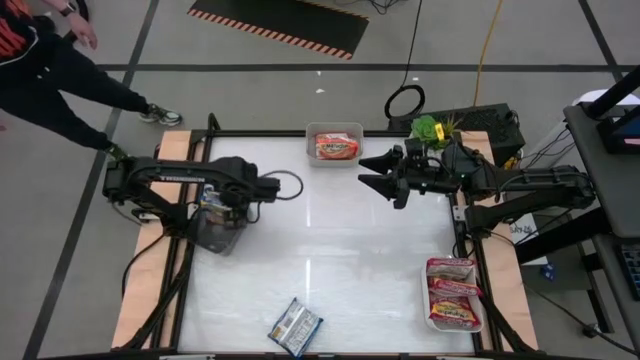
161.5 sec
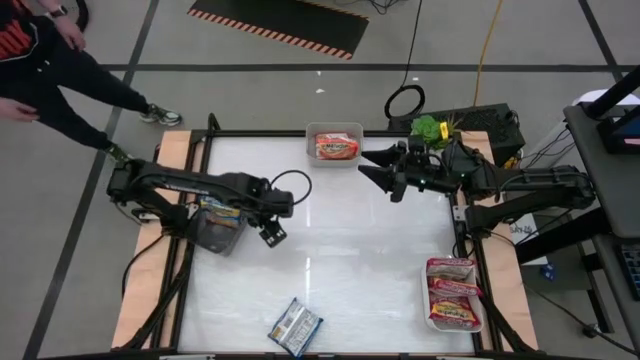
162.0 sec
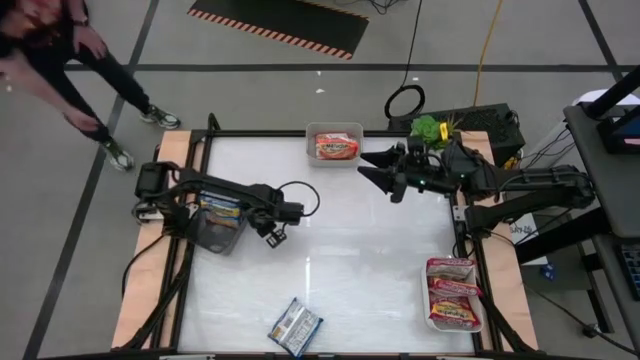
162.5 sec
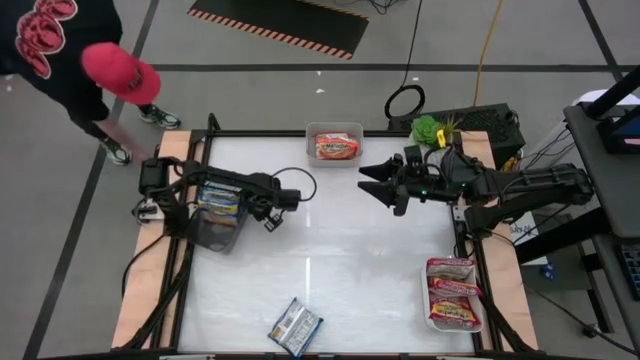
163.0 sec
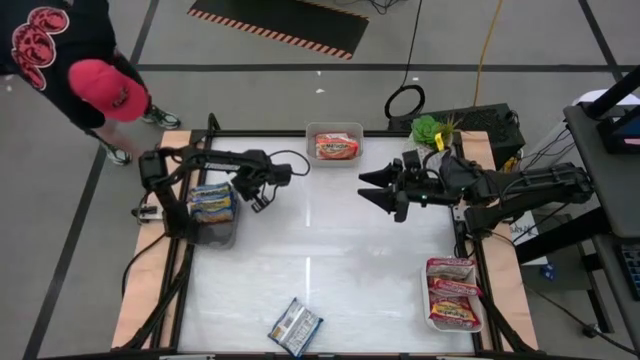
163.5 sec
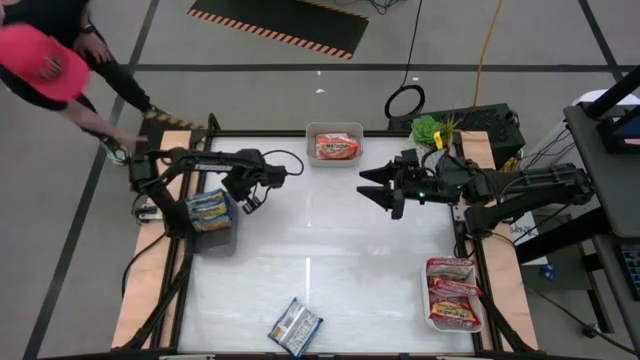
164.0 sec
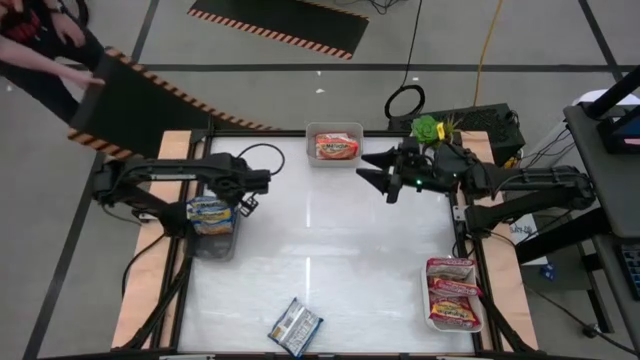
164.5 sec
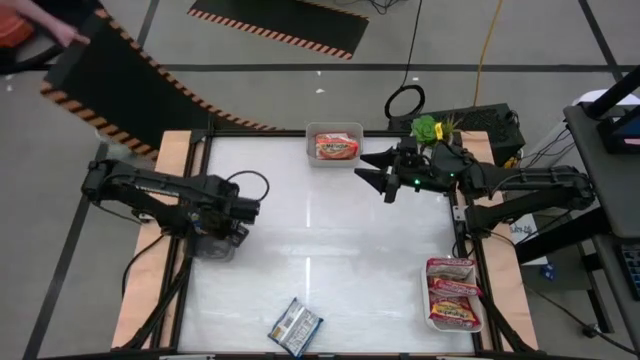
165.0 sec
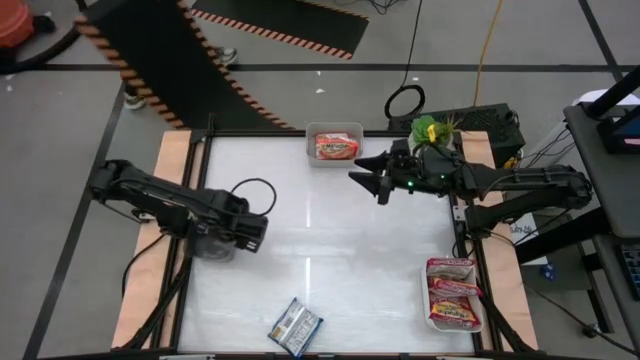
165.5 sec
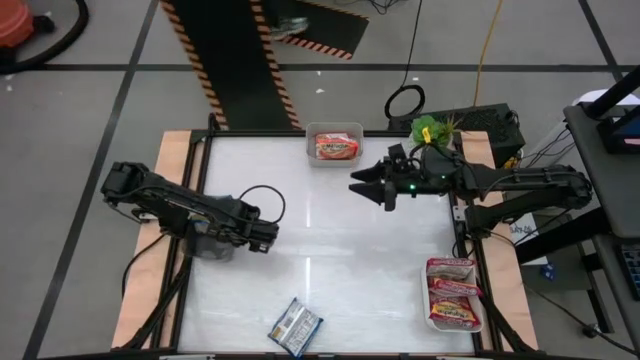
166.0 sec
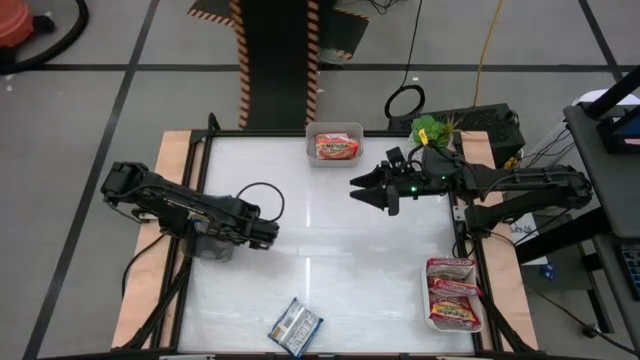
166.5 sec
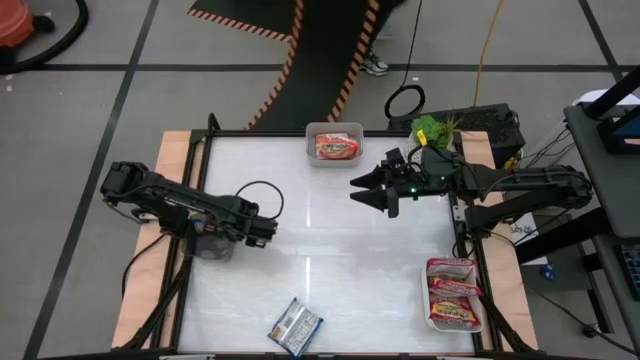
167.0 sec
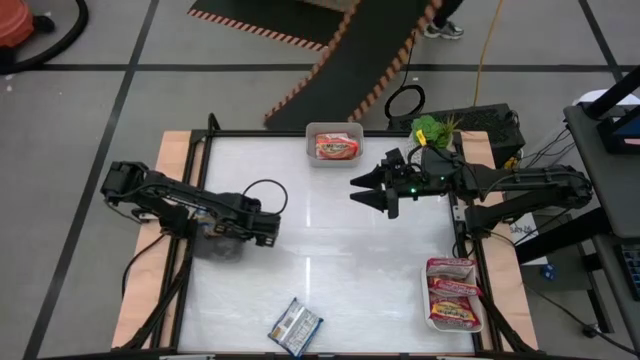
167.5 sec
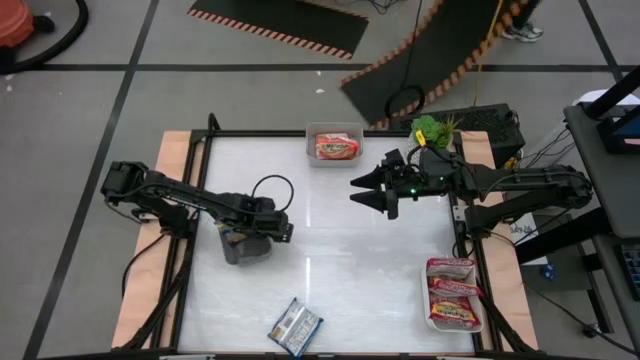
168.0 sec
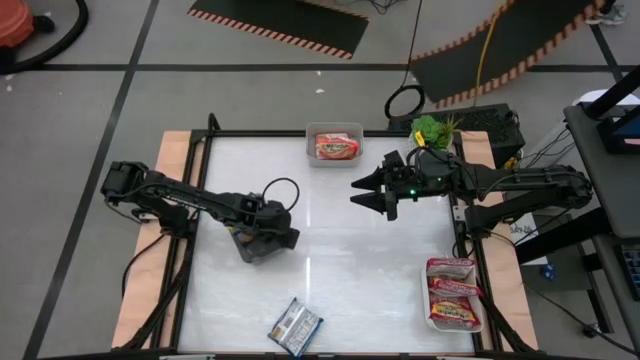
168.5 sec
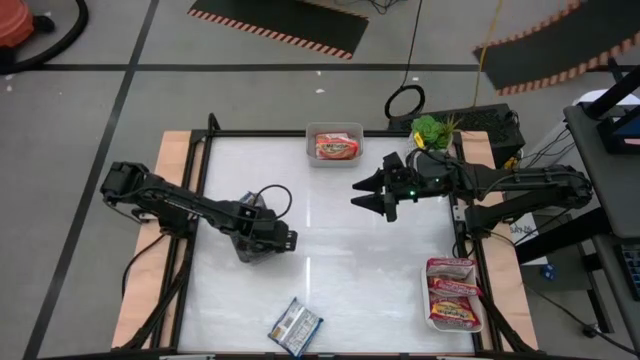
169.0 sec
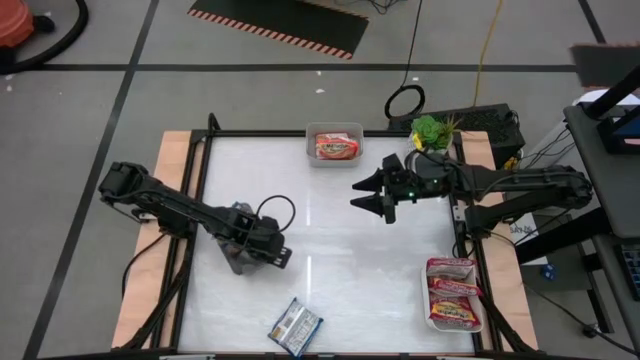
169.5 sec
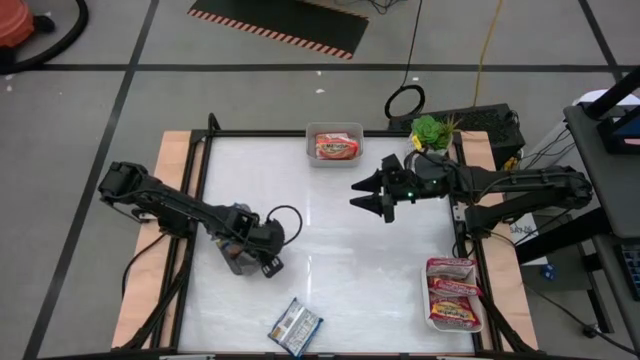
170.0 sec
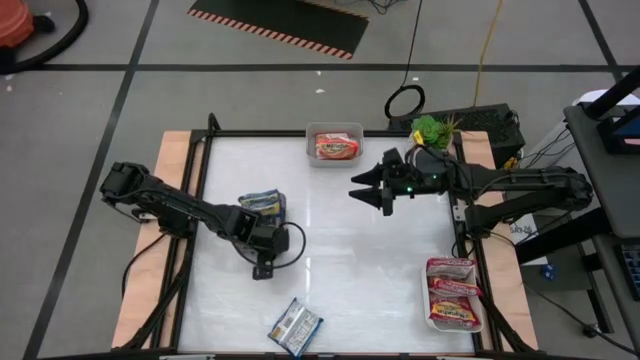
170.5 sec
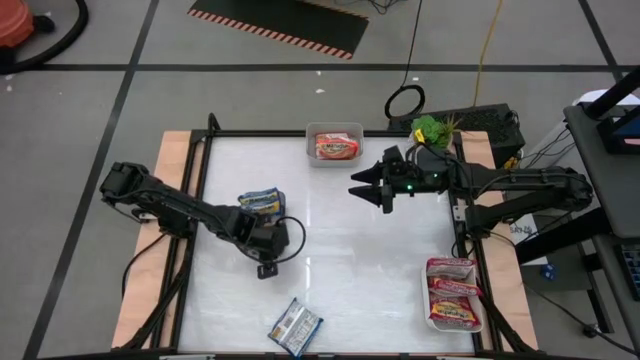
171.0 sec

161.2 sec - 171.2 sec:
Task: Sort Maruchan noodles
Adjust the black bin on the table

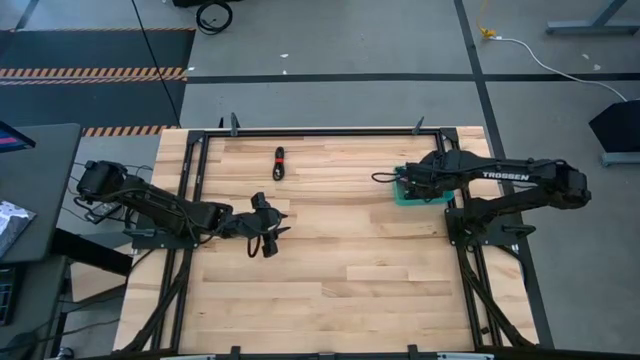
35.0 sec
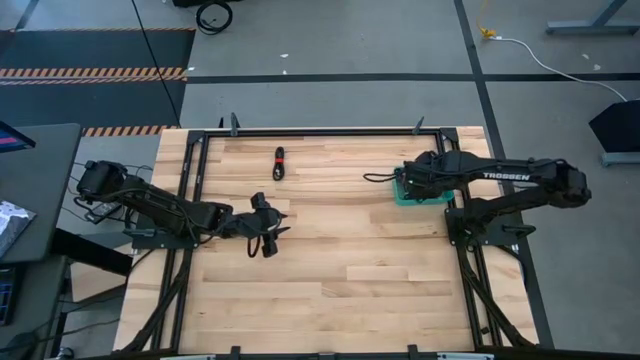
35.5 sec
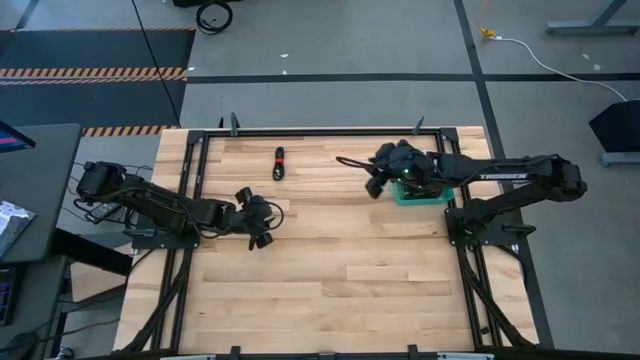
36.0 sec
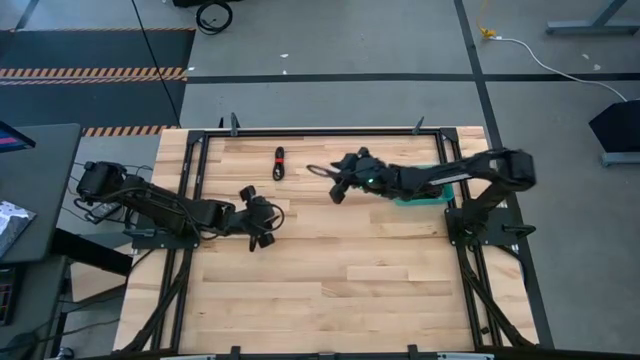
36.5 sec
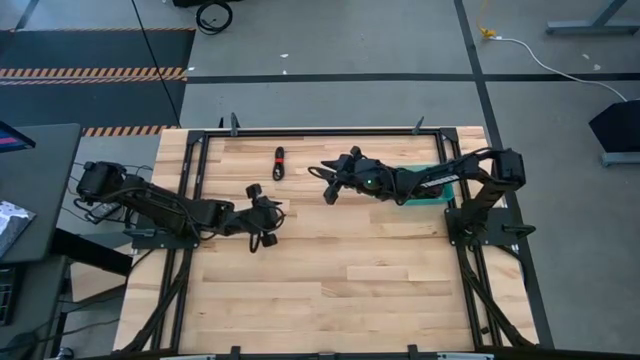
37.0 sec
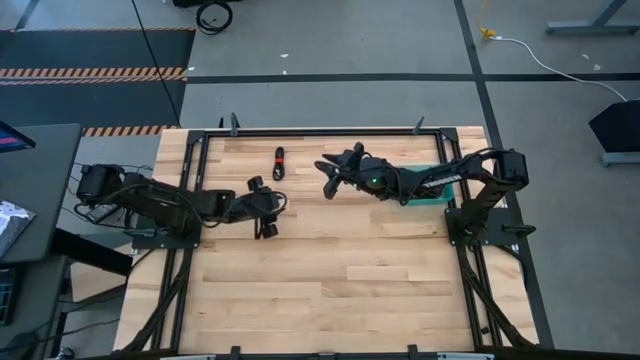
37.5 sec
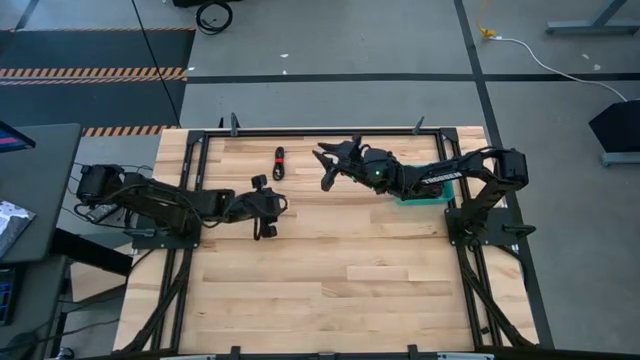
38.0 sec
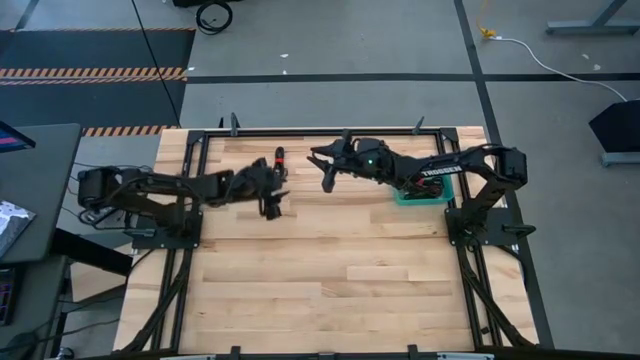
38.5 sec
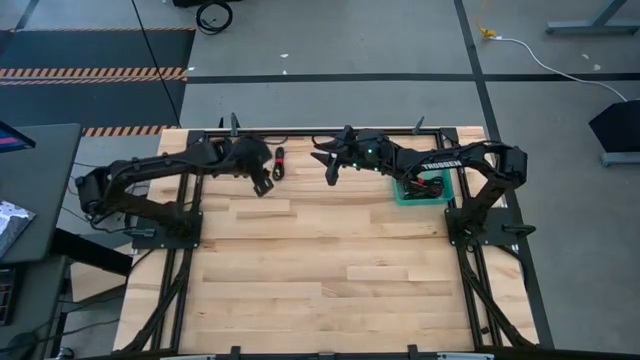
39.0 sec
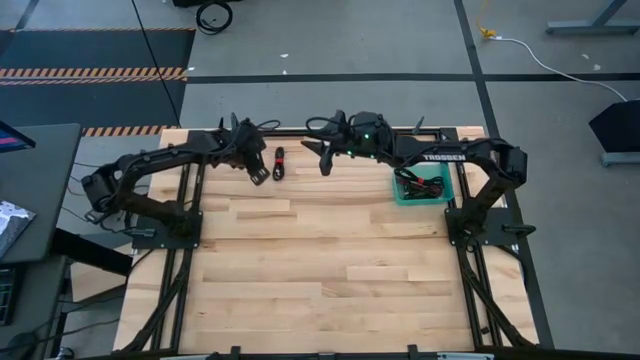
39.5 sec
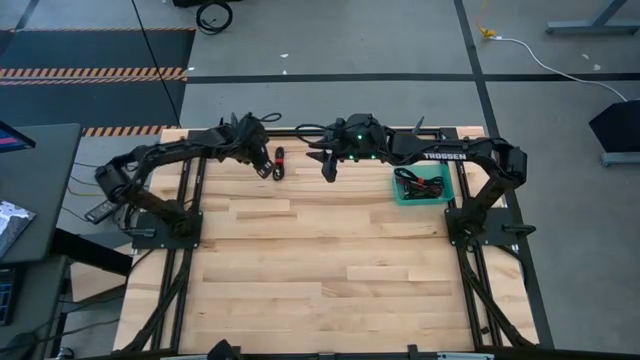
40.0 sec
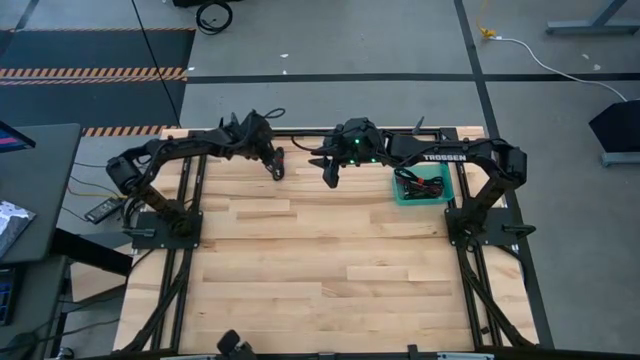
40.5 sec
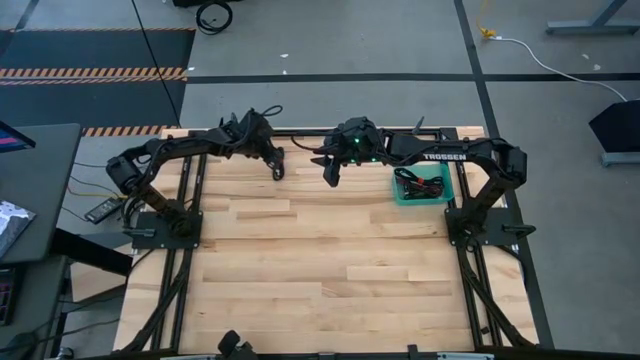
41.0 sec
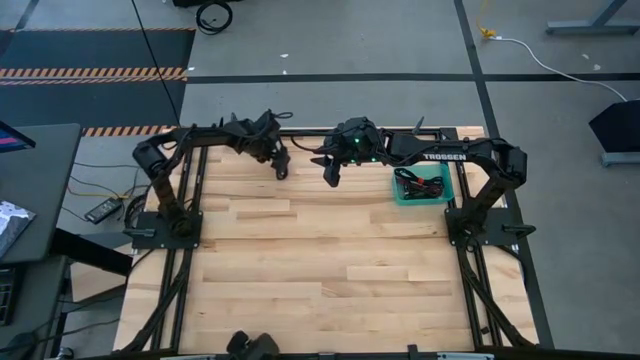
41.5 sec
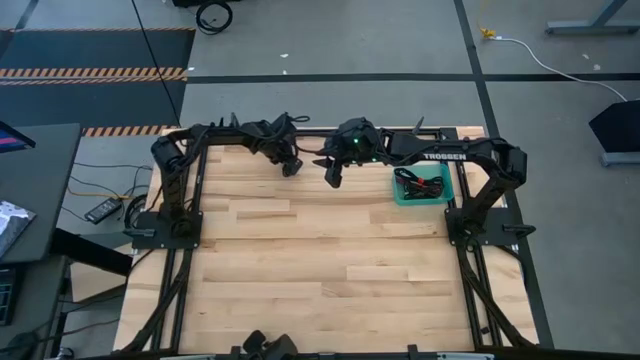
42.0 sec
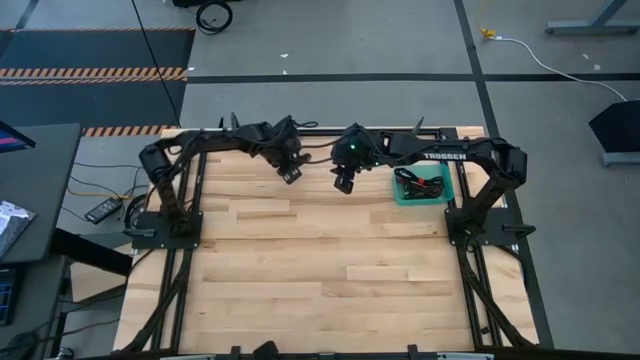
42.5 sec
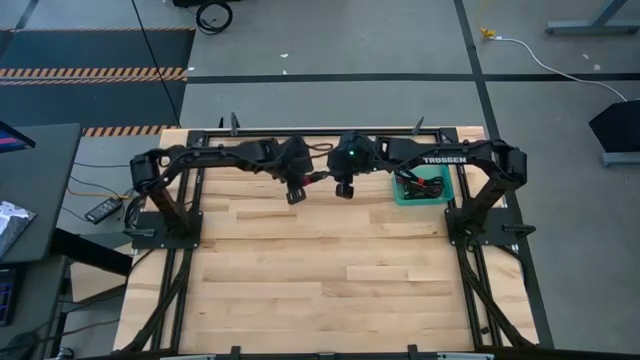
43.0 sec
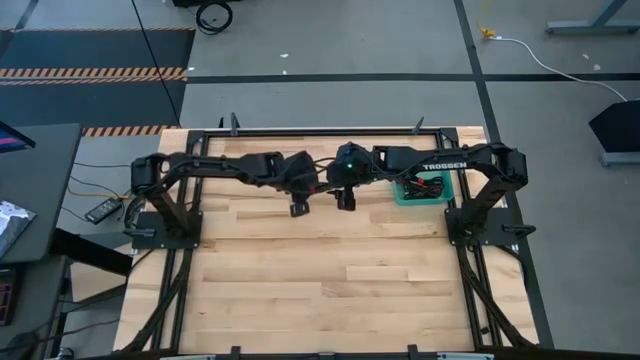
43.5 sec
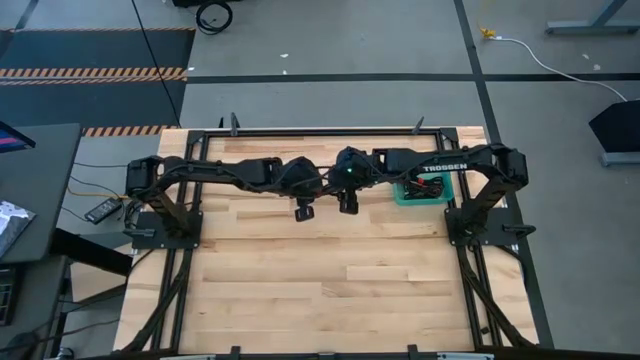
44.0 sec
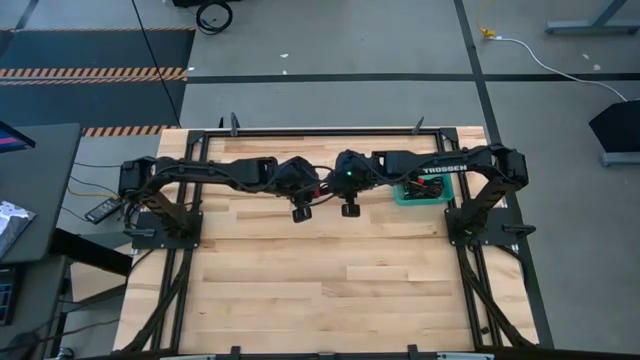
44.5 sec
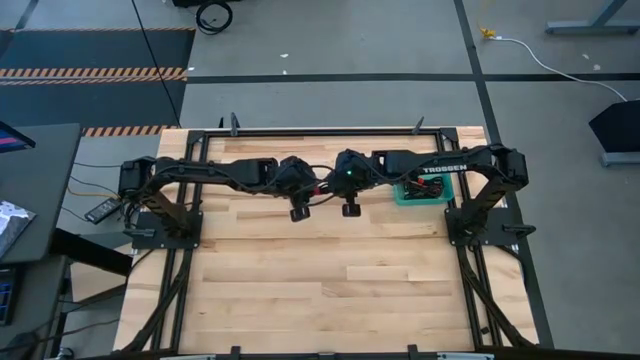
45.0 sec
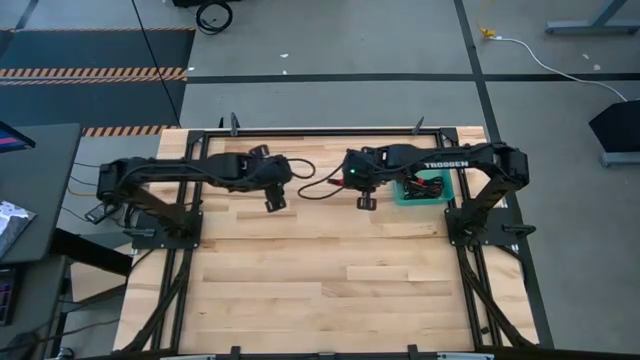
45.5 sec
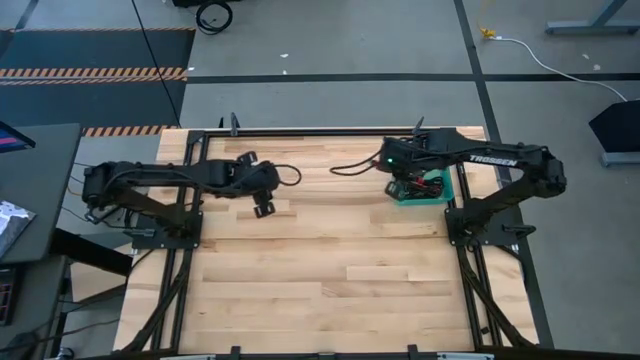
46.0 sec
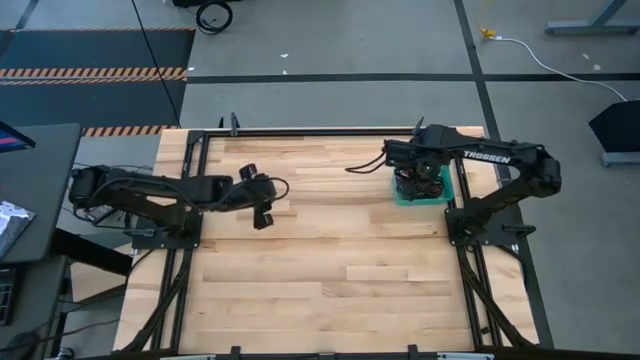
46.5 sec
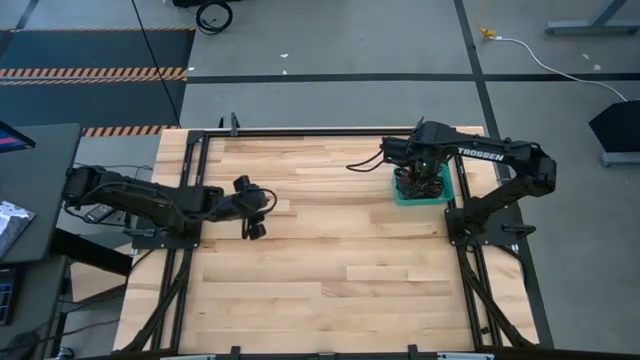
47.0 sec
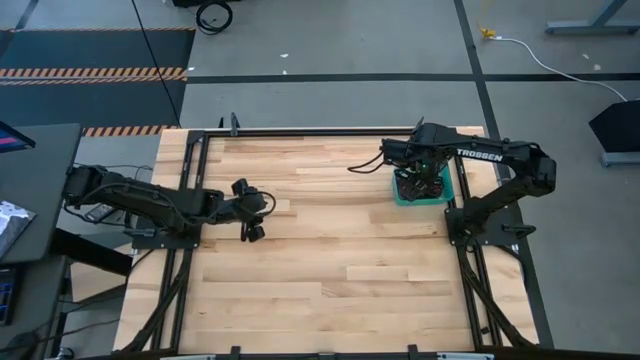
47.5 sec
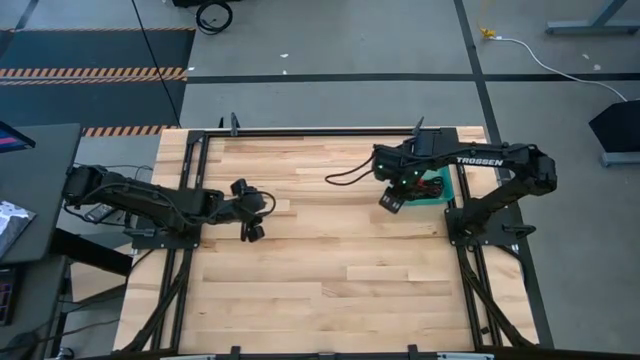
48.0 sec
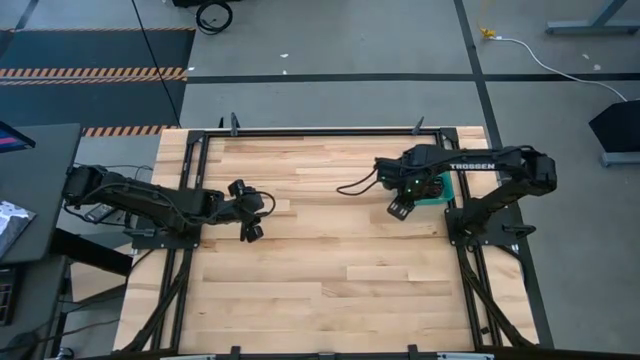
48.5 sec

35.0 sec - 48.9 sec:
Task: Pick and place USB-C Cables
Put the black charger cable into the bin
